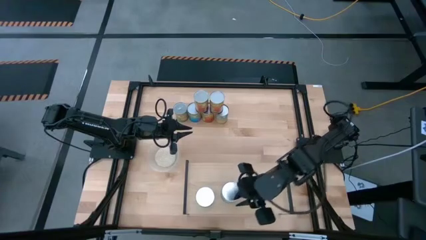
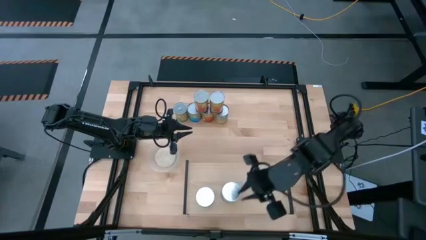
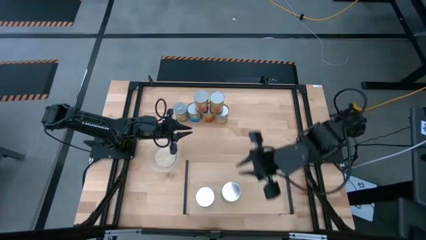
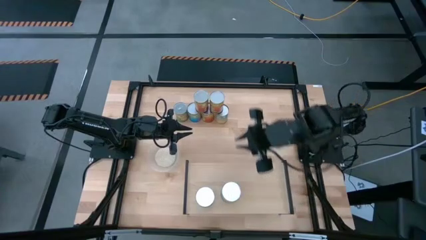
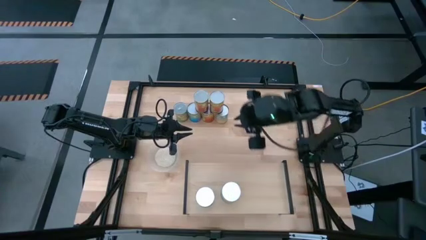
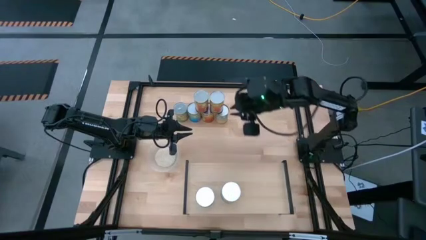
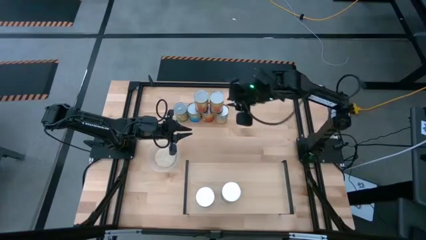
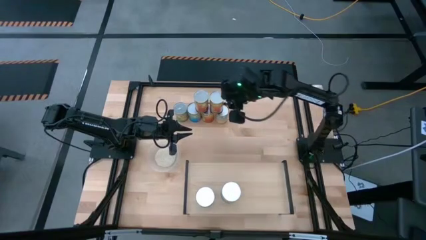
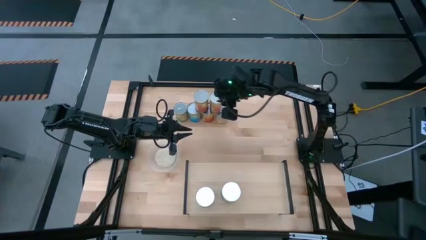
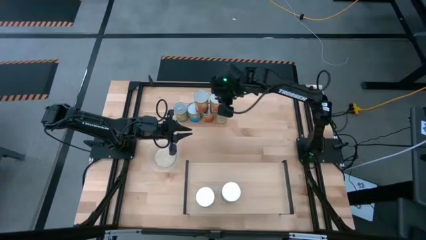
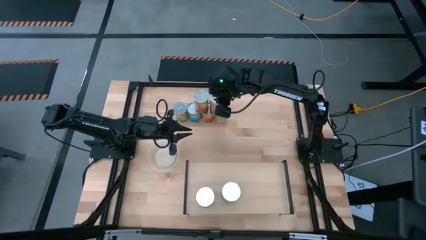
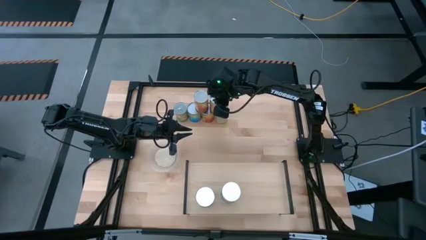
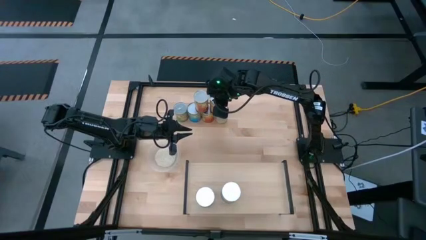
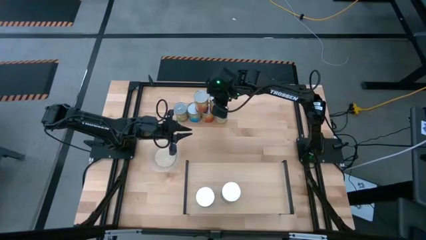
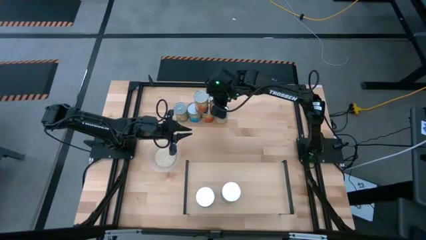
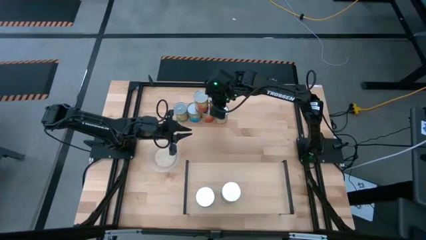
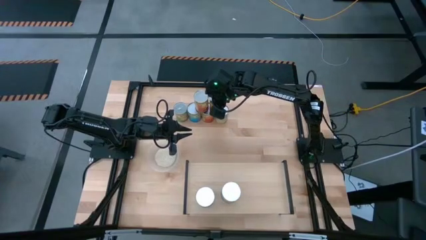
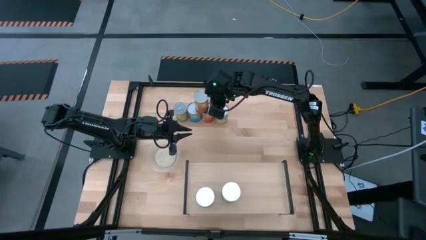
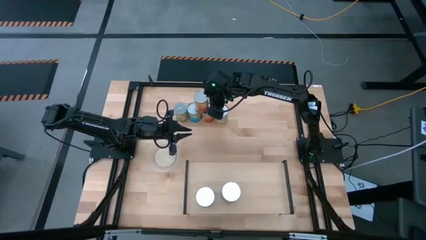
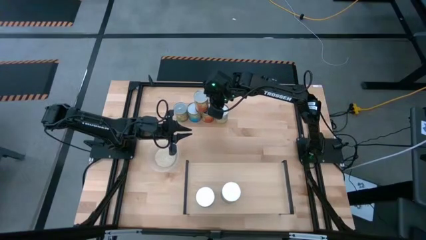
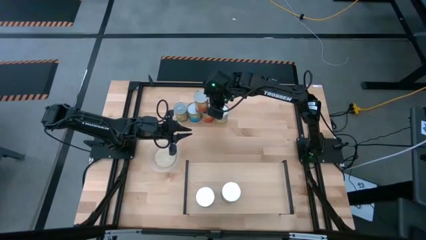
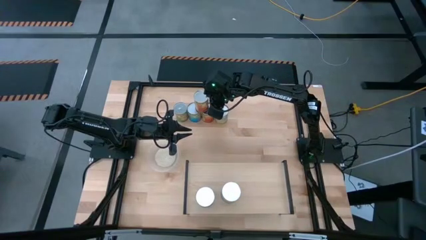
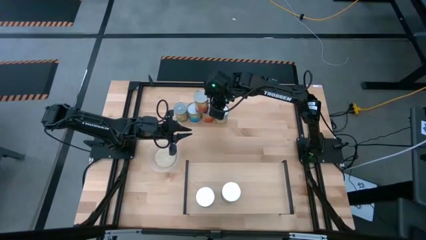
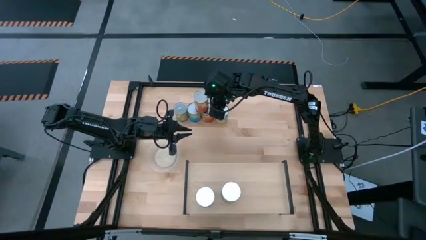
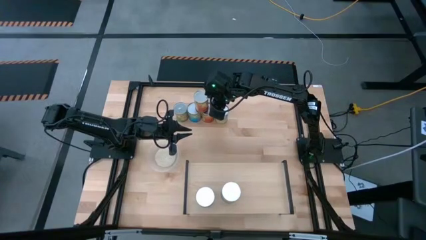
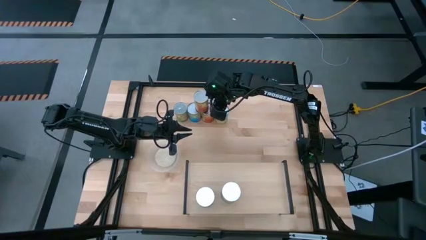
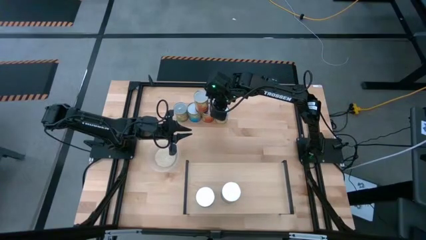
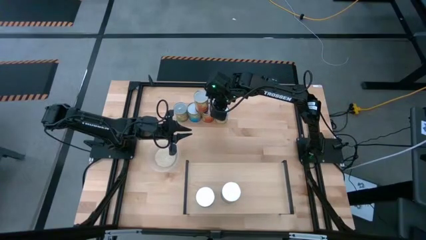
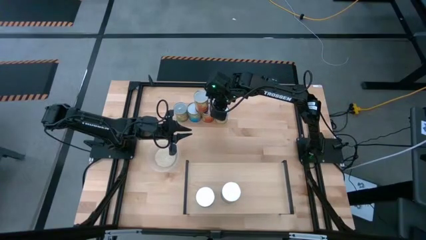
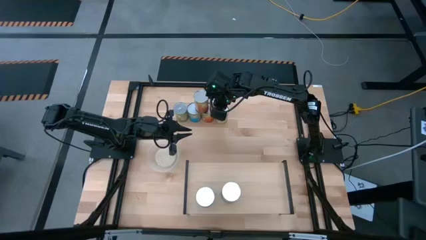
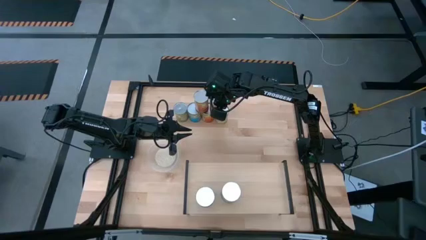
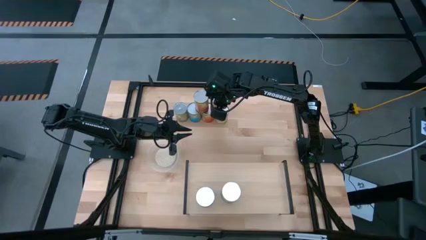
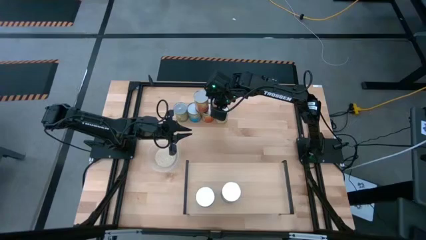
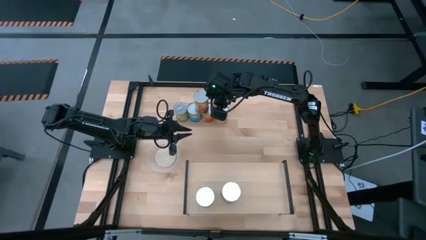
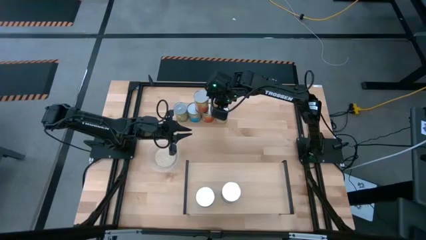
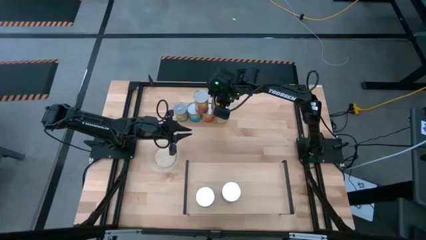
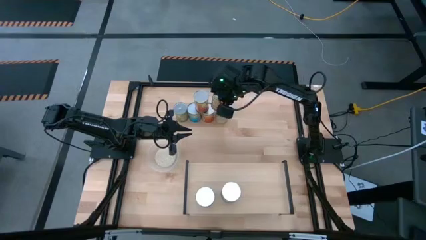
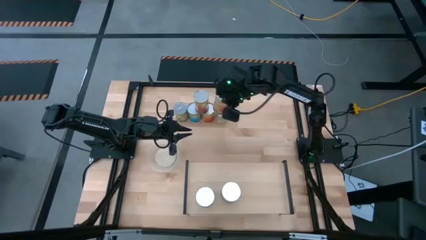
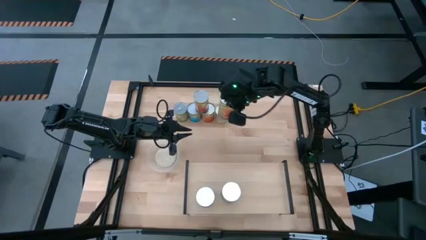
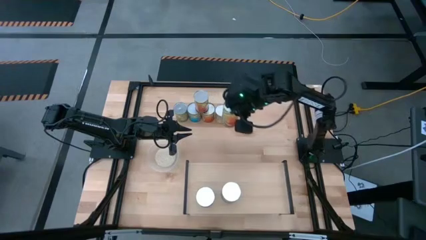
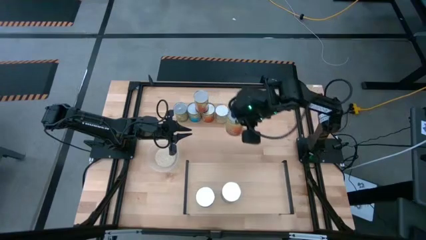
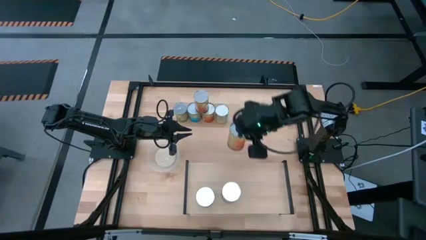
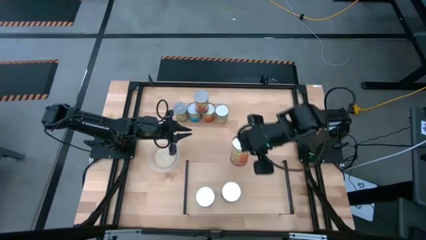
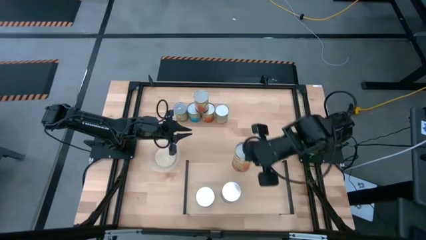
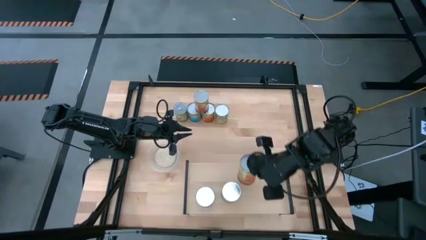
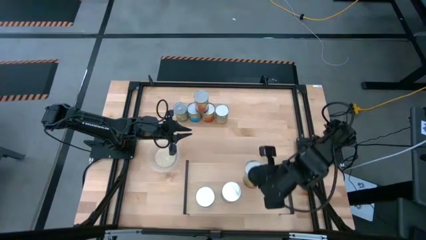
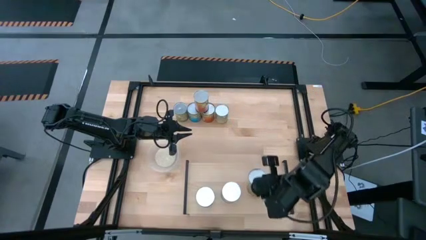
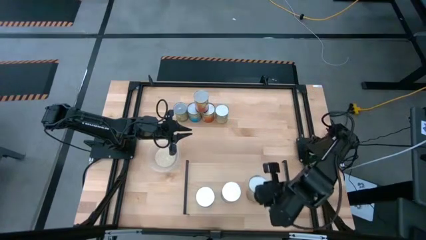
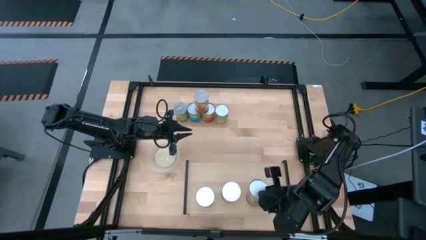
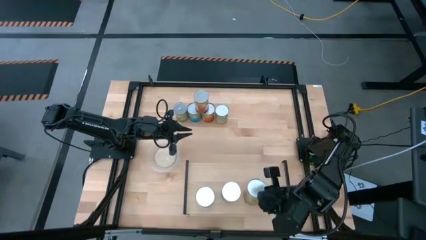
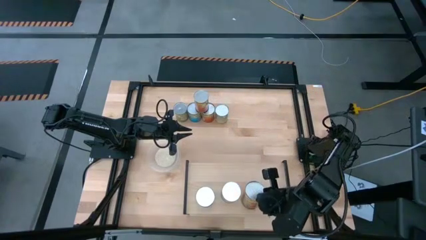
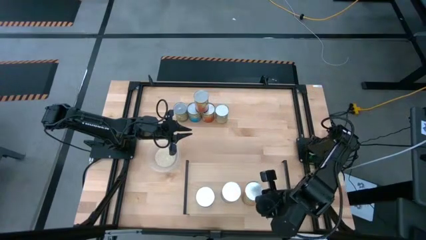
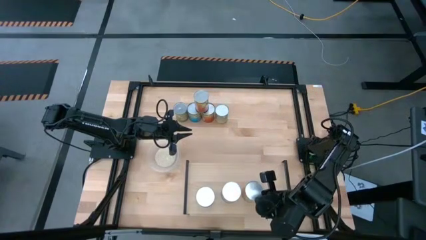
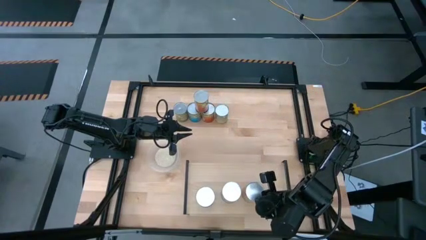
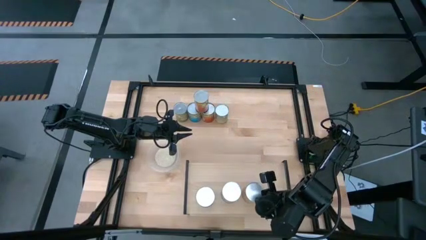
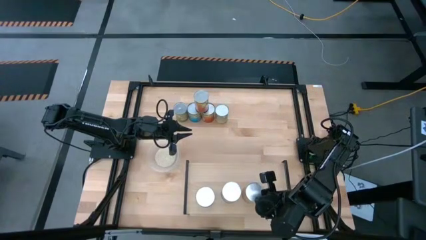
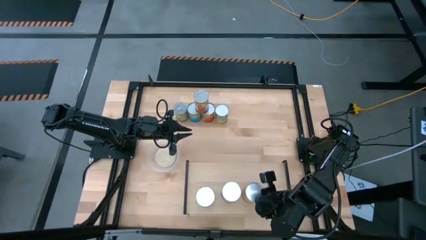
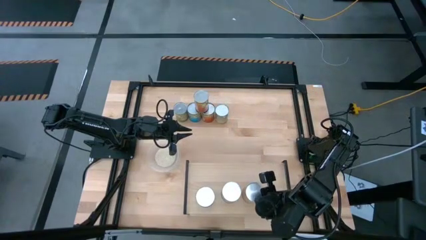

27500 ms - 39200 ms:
Task: Pick and place cans onto a shelf
Put the canned green beans on the shelf

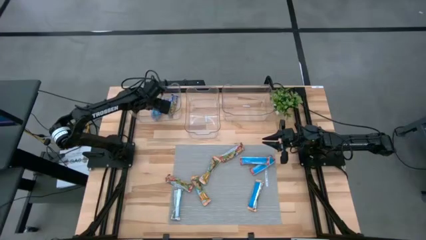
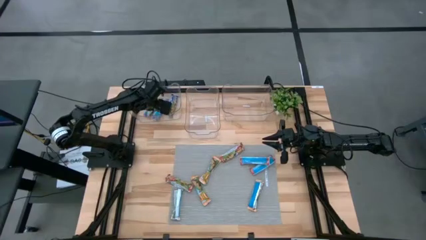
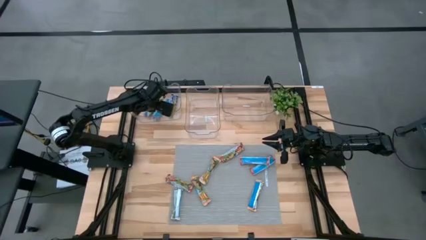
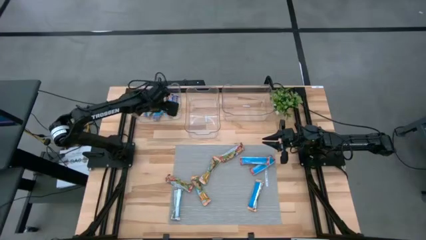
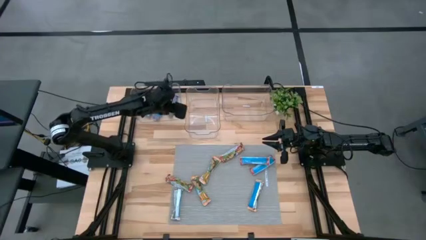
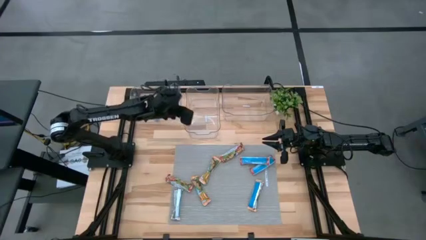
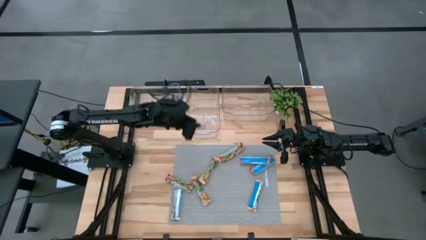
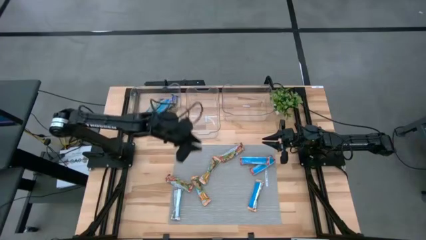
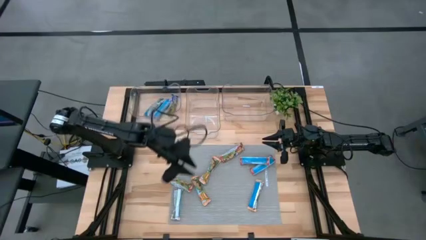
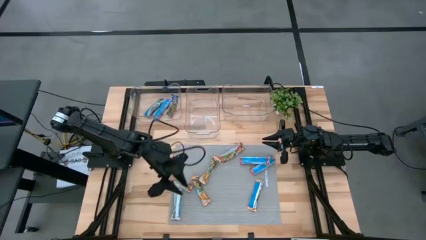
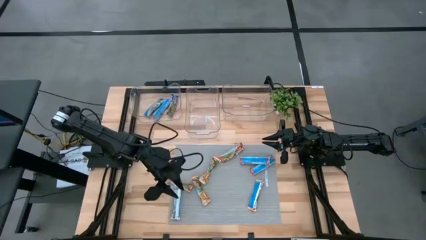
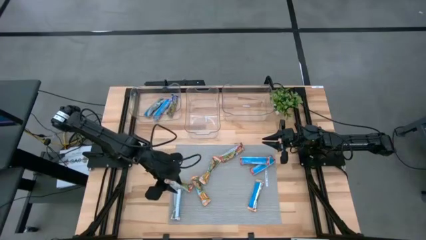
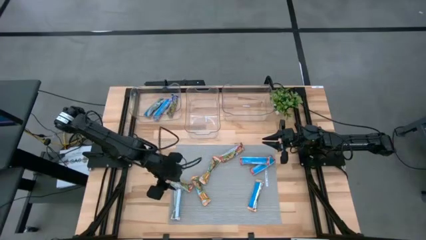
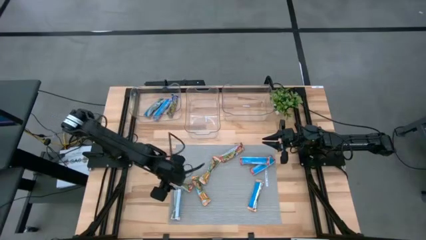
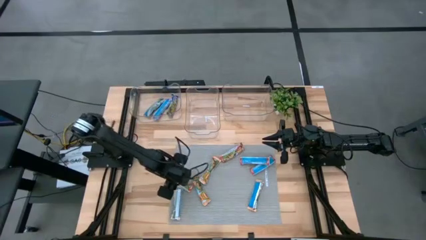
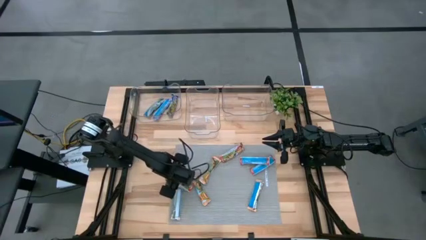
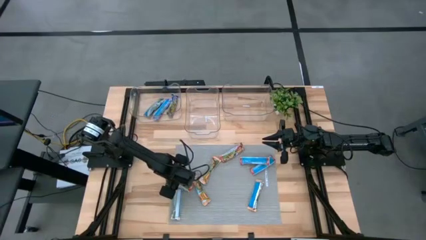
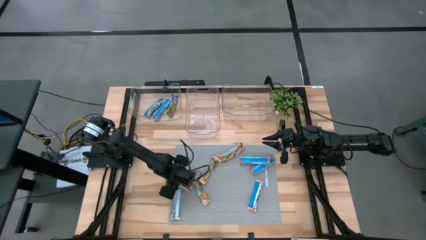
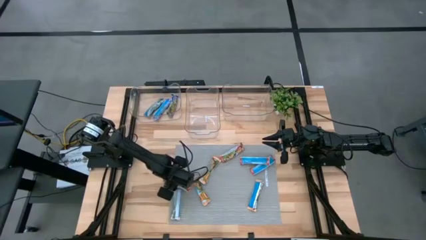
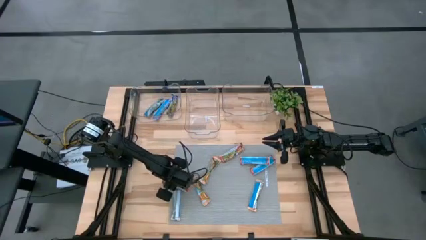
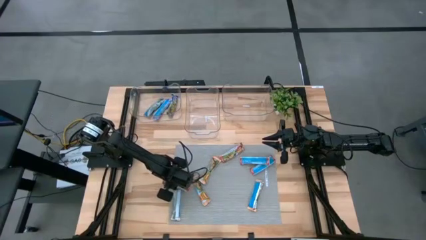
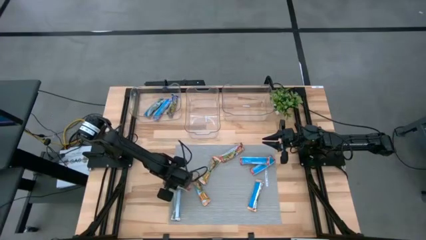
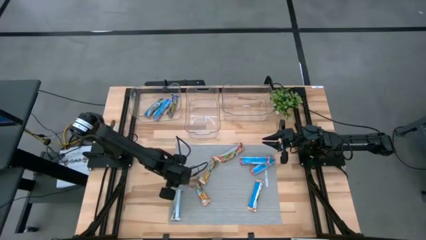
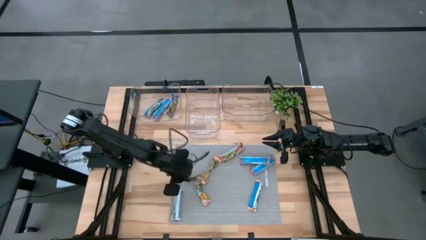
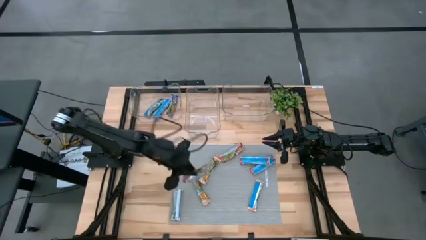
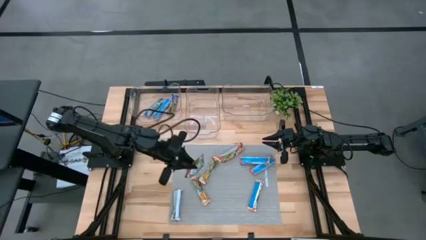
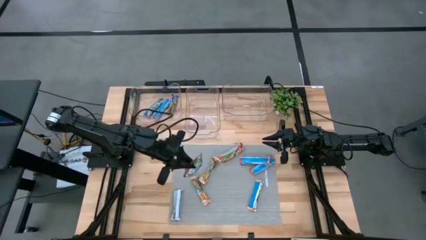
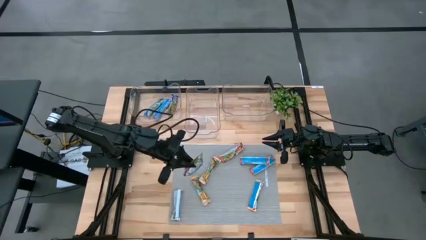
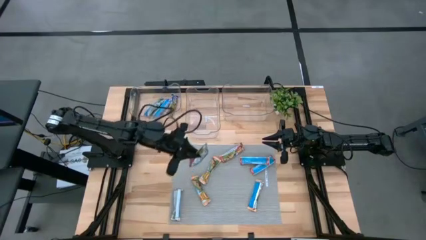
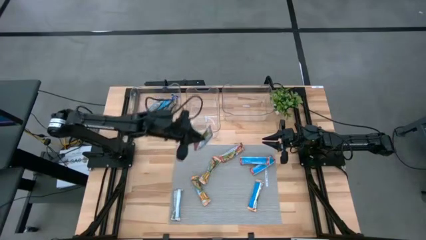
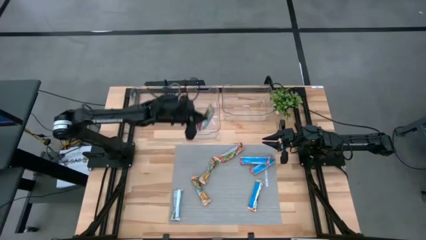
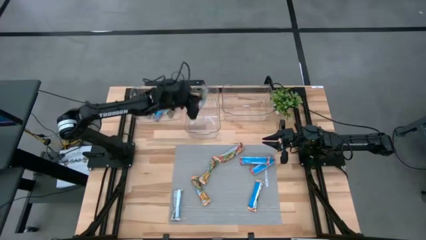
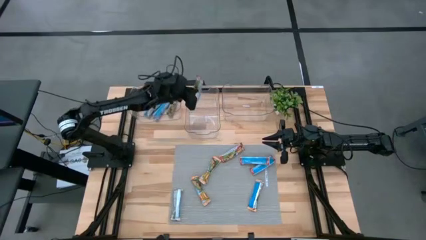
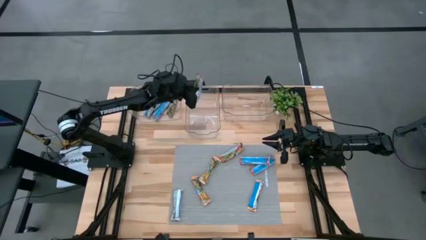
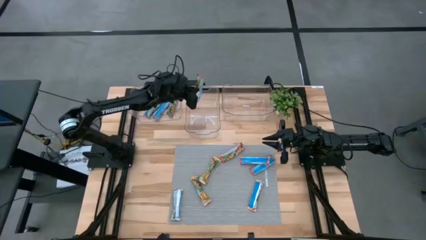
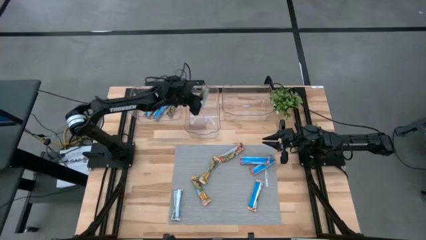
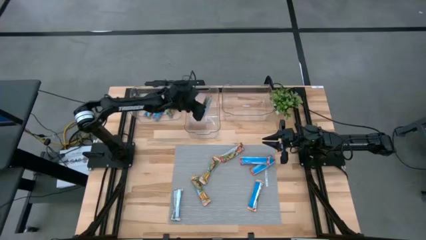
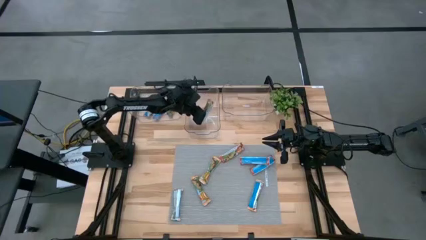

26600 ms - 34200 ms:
Task: Pick and place Granola Bars by type
Put the red granola bar into the middle transparent bin
